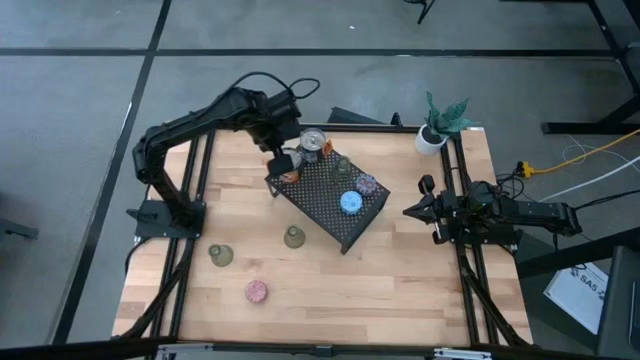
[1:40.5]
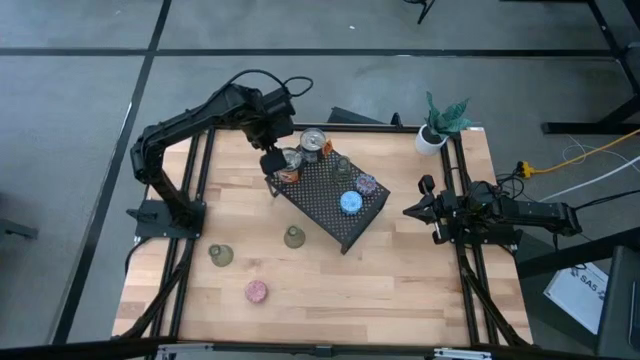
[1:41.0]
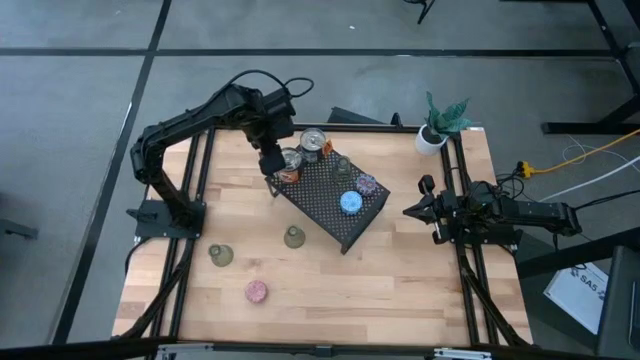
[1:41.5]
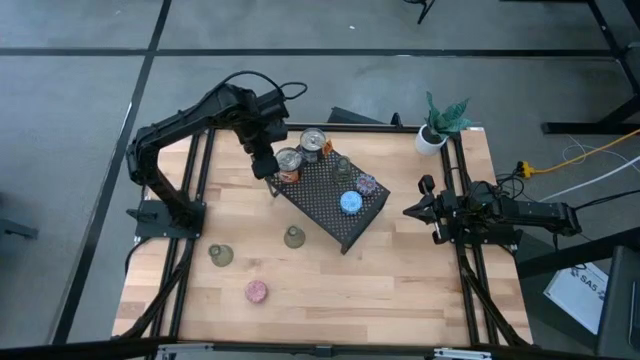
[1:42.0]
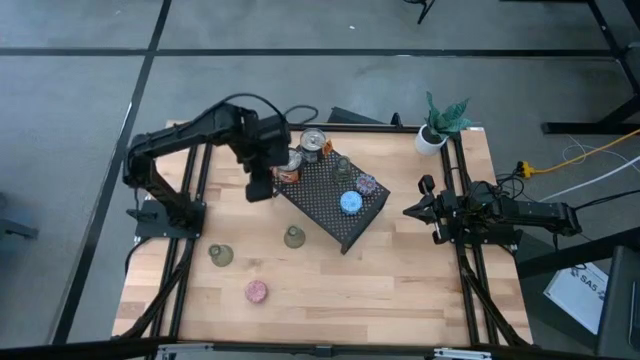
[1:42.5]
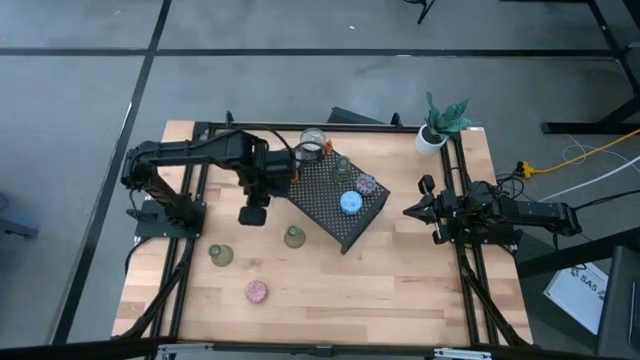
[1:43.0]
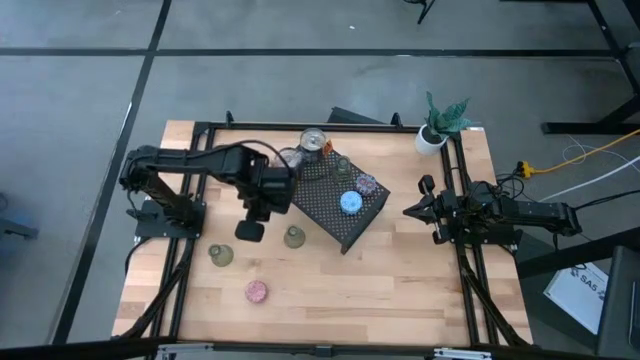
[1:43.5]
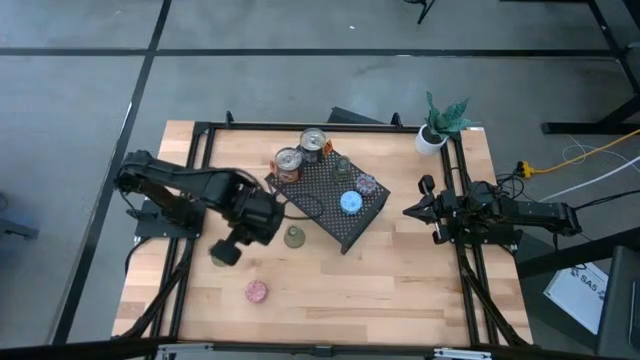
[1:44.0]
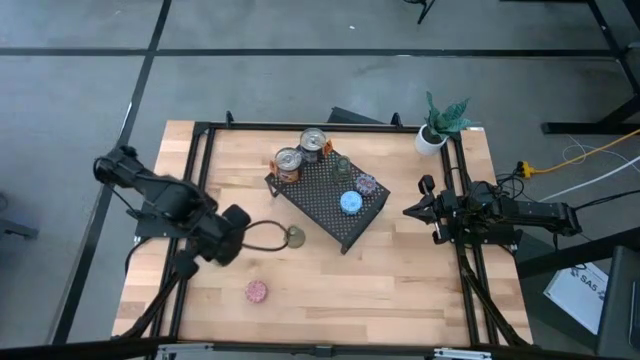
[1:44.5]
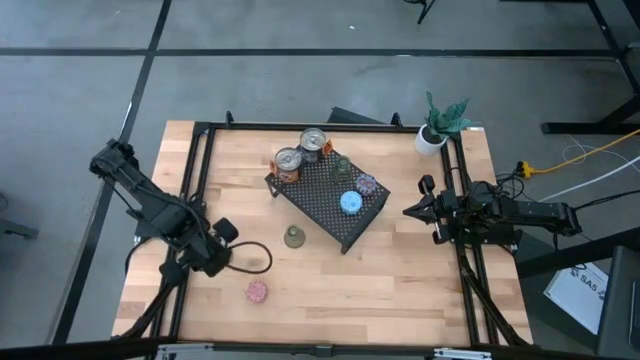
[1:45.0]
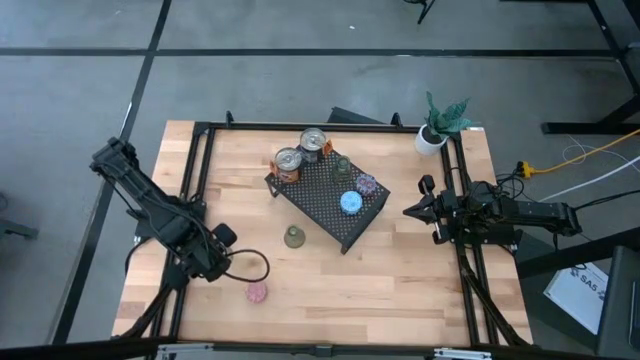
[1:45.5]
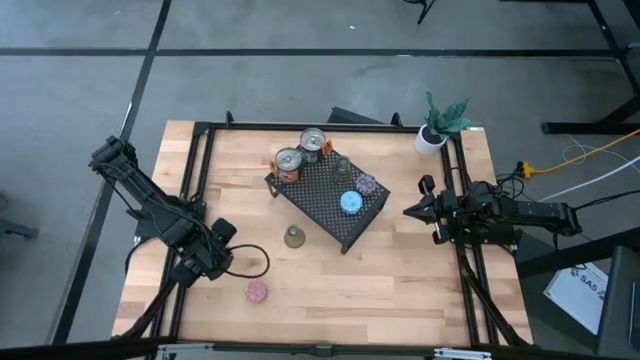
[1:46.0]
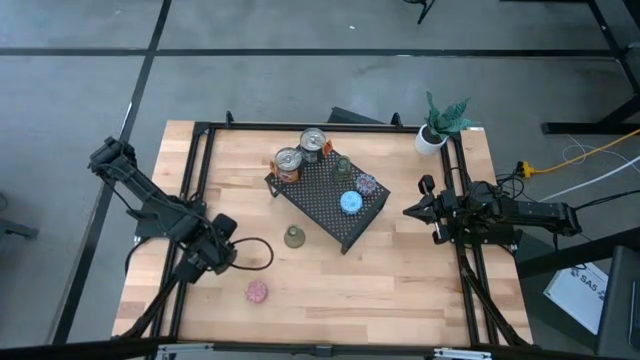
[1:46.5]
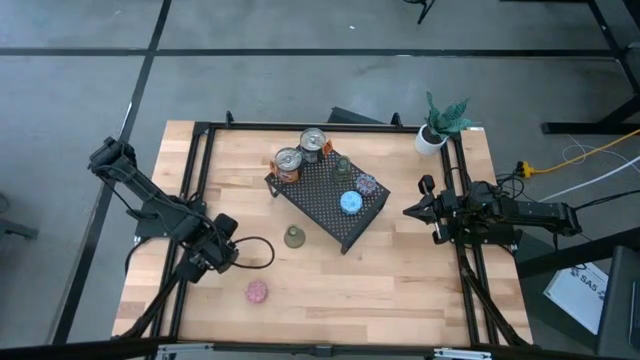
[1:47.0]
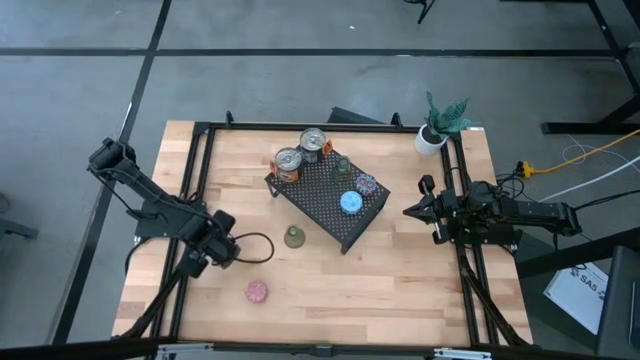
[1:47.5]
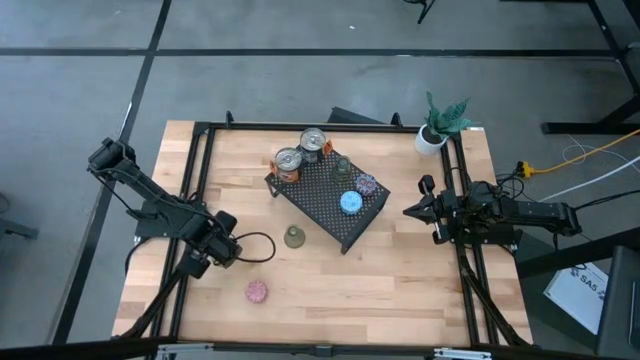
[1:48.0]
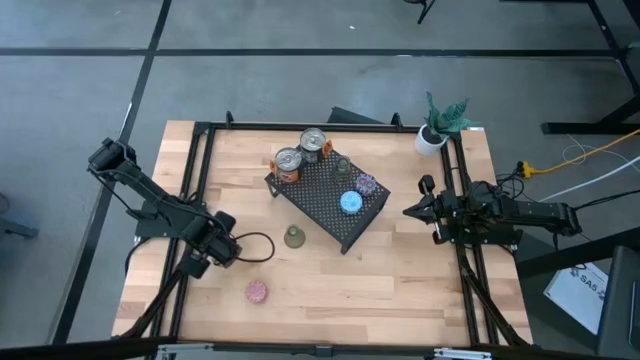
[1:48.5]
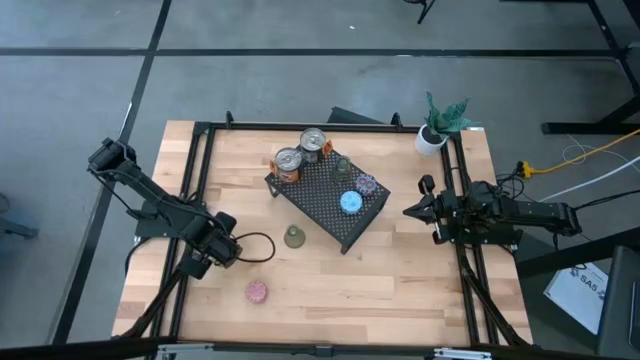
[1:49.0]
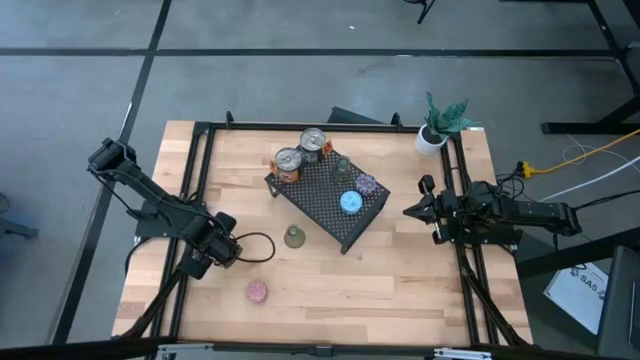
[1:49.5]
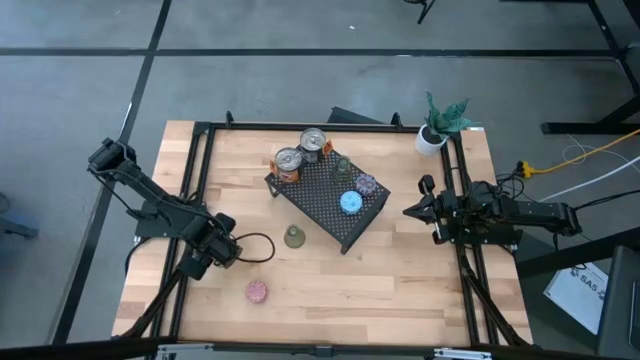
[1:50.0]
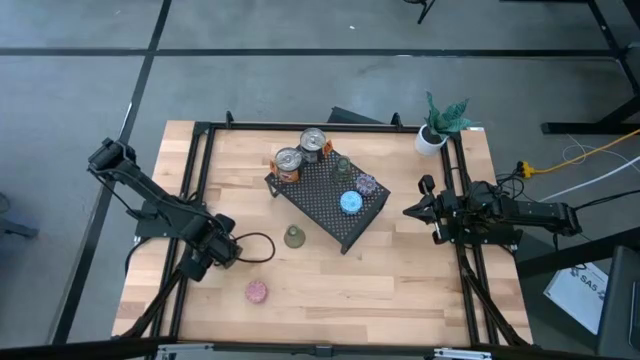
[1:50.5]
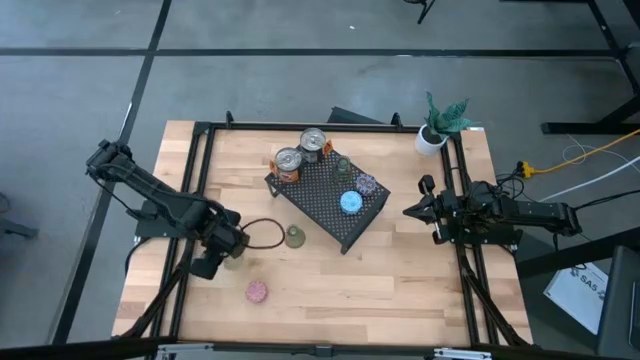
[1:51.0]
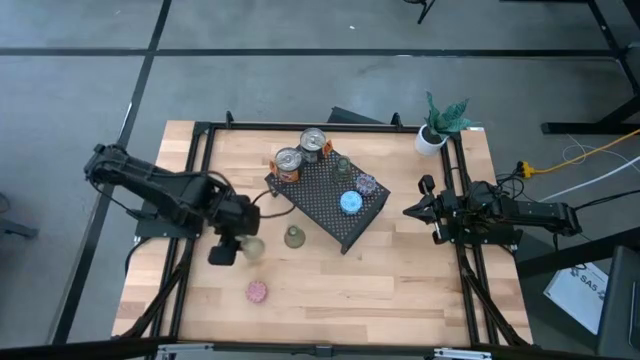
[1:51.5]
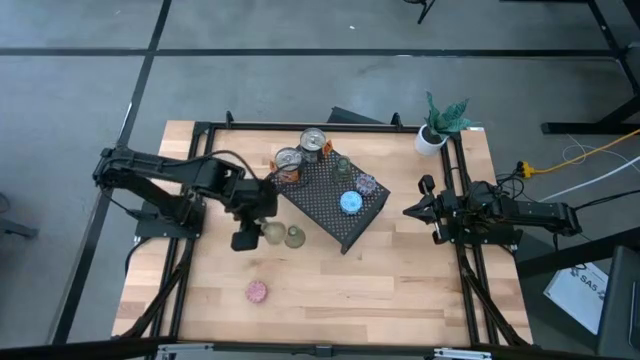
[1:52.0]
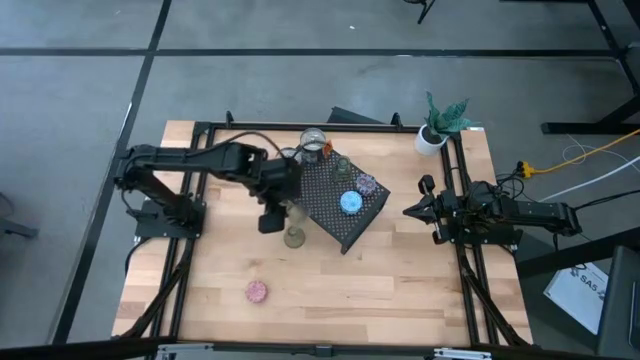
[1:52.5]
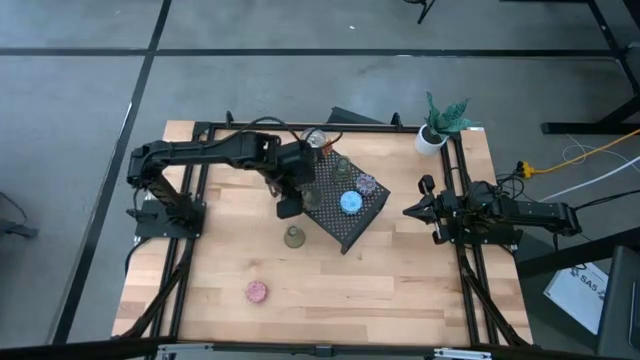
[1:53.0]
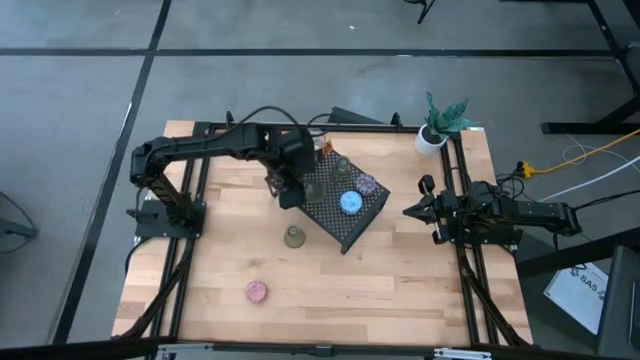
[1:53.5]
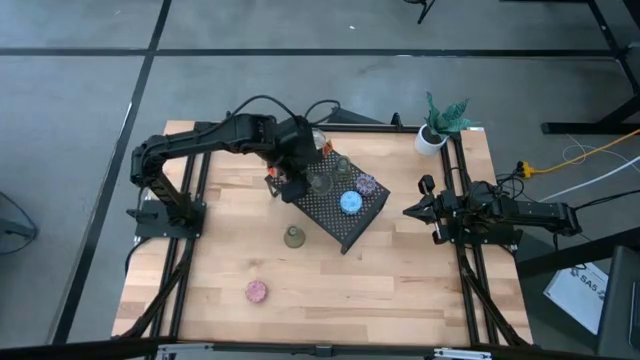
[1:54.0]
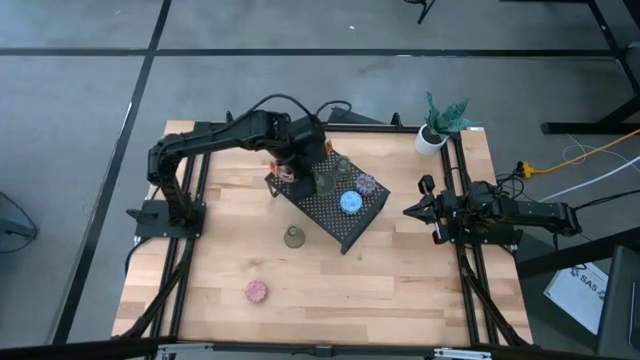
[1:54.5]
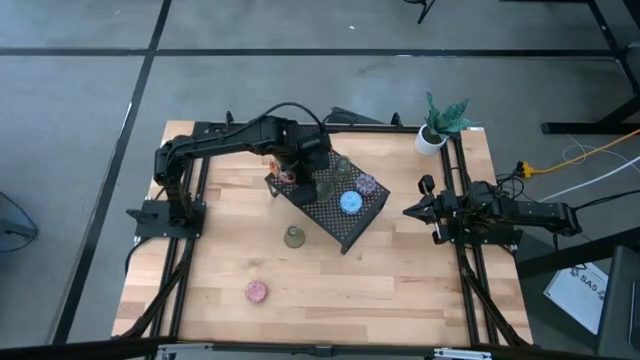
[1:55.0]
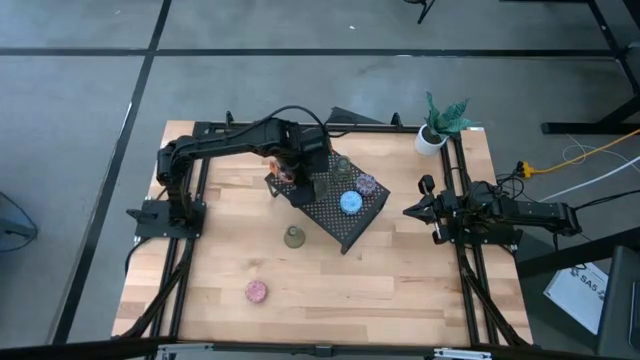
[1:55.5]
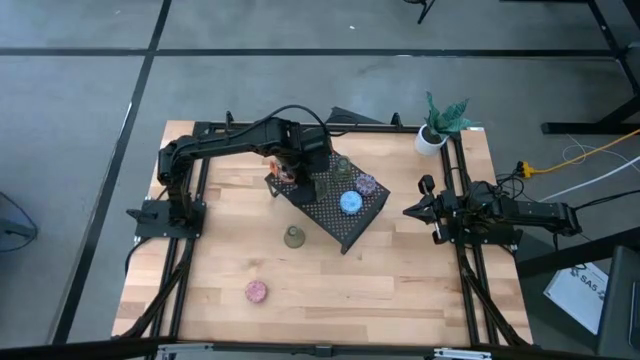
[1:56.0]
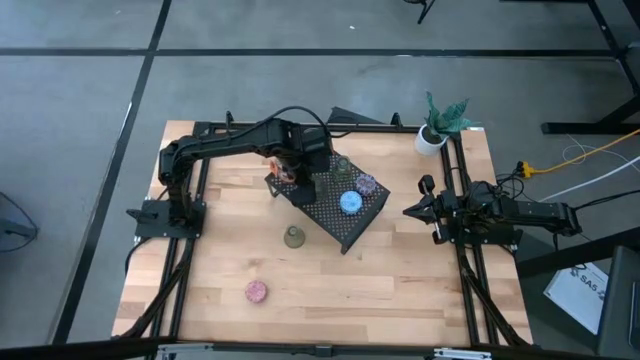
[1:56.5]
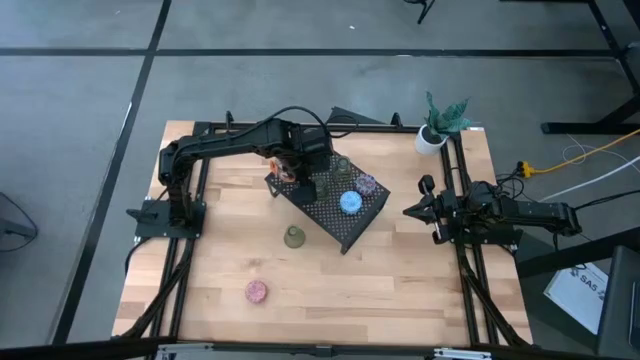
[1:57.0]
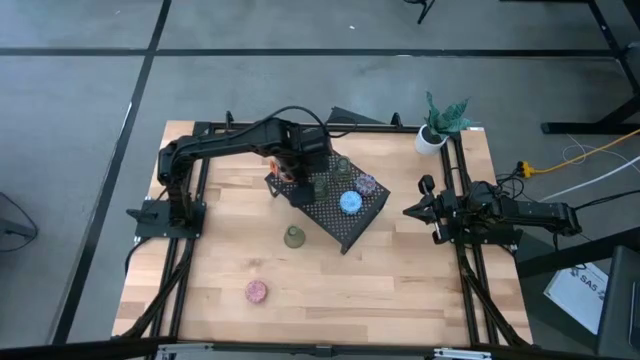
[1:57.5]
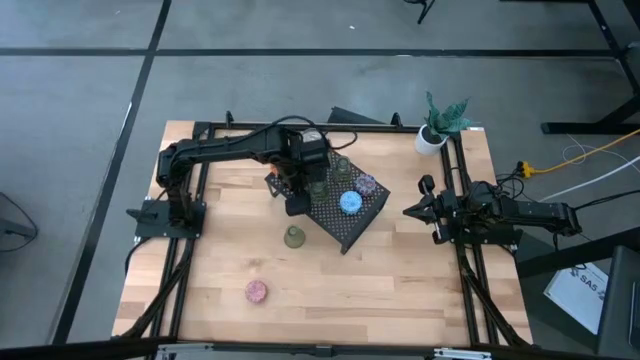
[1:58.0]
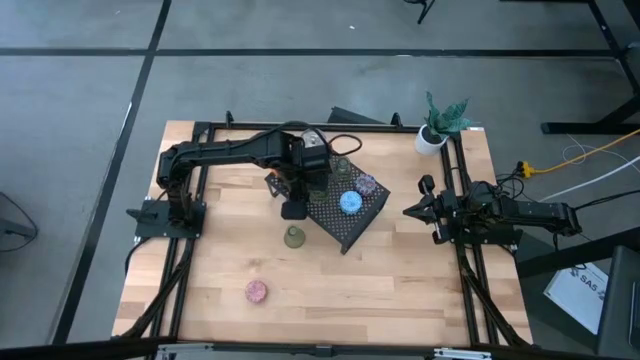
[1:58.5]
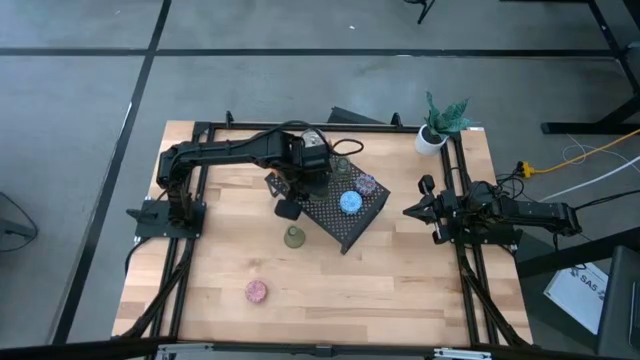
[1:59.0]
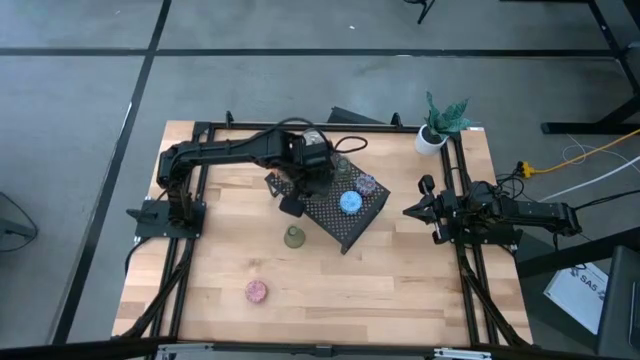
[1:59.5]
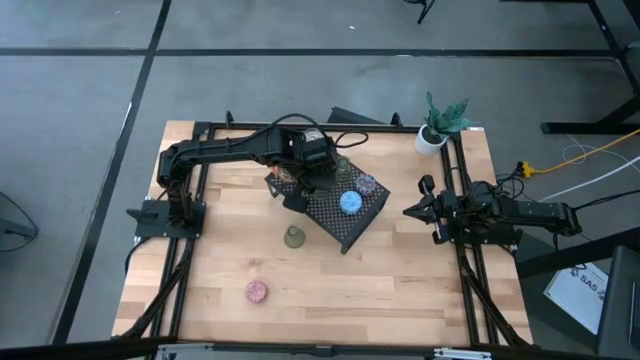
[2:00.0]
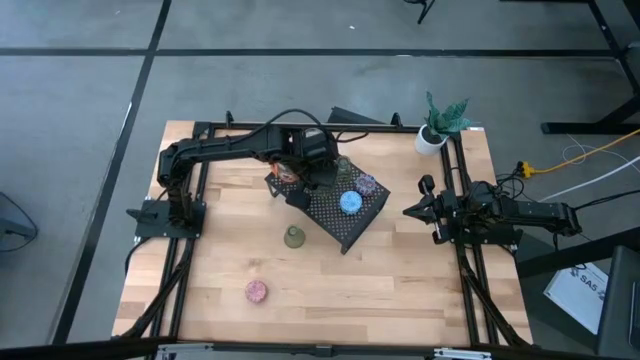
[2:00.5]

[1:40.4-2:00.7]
Task: Pick & Place candle stick holders
Put the left glass candle holder on the shelf

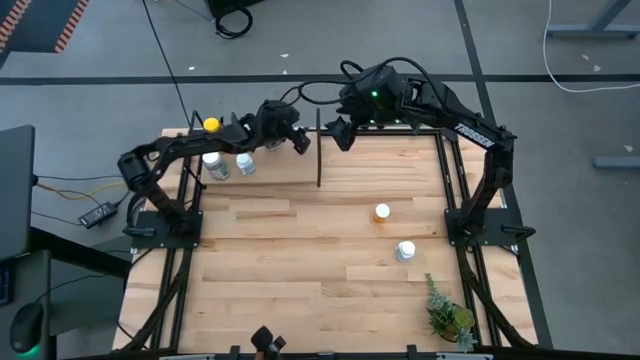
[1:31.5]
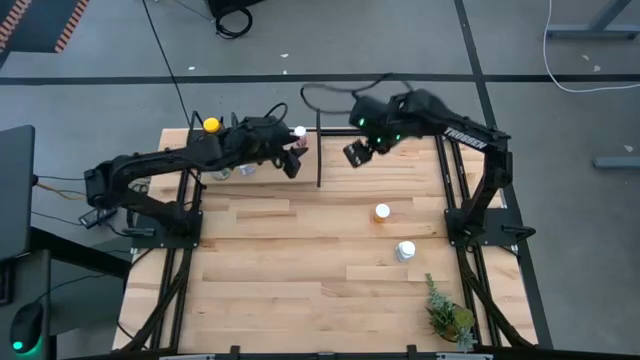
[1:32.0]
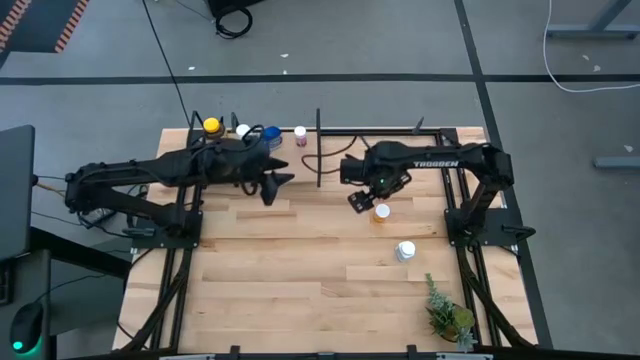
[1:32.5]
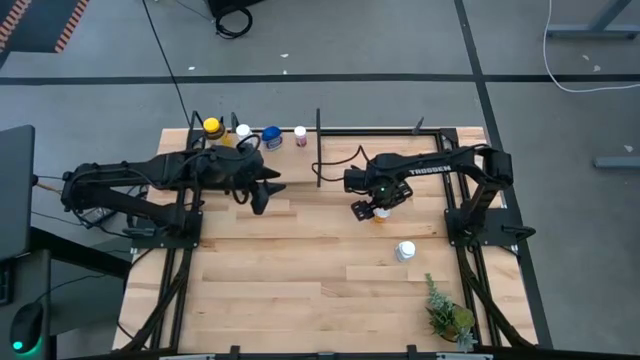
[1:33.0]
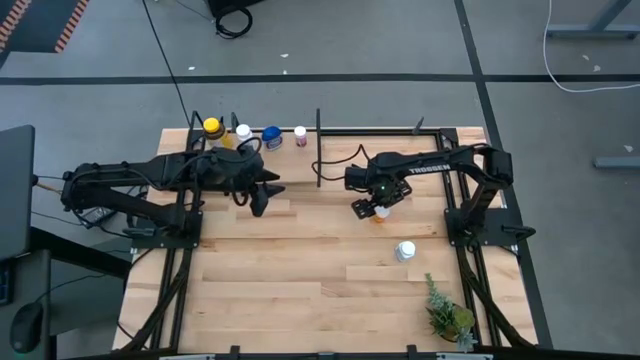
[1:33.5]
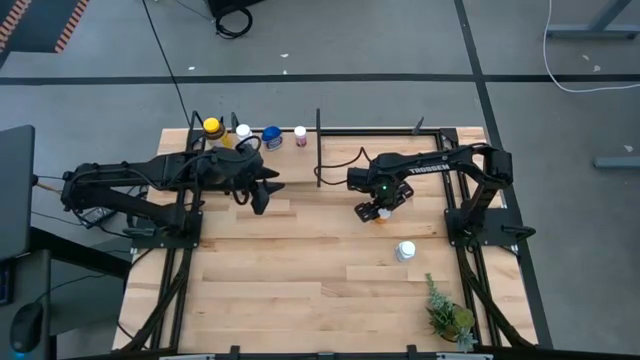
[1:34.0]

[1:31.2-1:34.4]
Task: Pick and place medicine bottles onto shelf by color
Put the orange medicine bottle on the shelf
